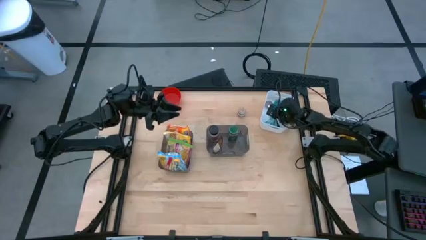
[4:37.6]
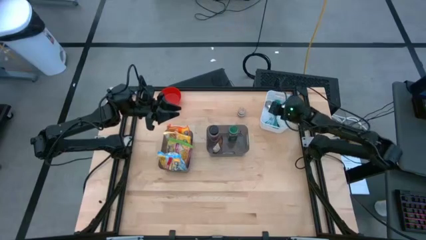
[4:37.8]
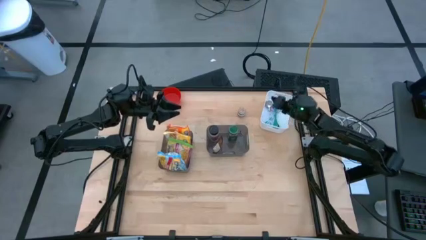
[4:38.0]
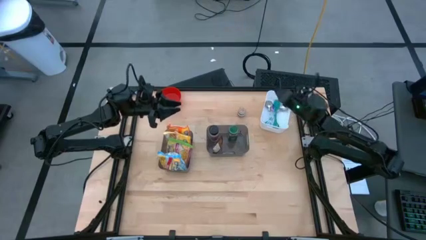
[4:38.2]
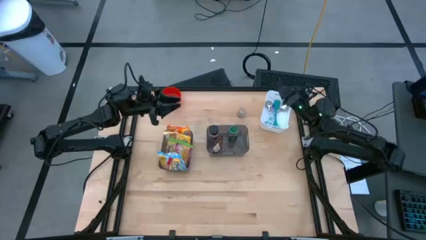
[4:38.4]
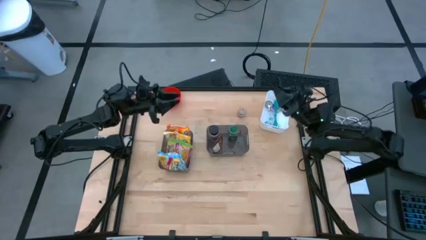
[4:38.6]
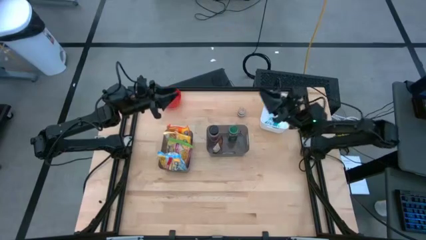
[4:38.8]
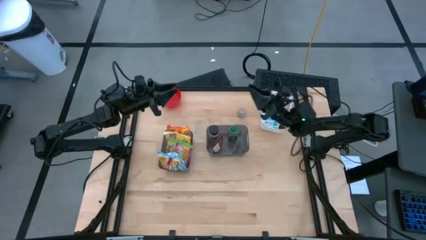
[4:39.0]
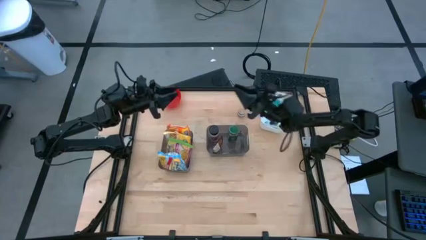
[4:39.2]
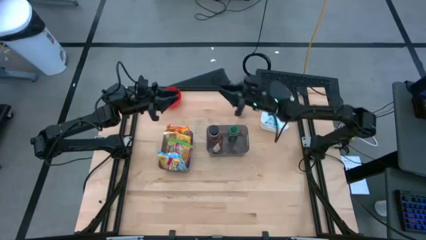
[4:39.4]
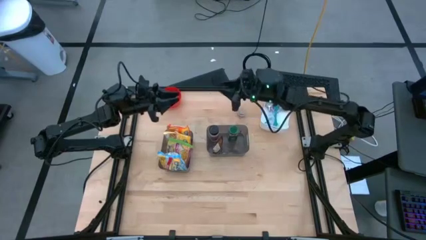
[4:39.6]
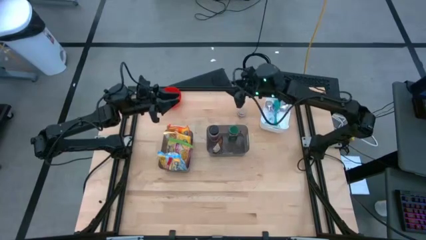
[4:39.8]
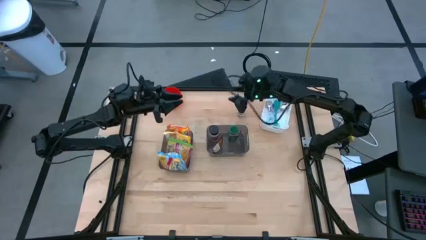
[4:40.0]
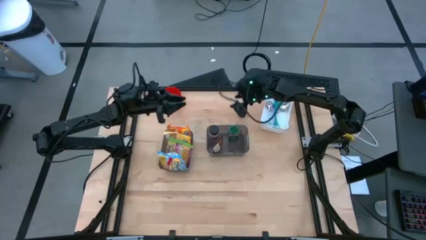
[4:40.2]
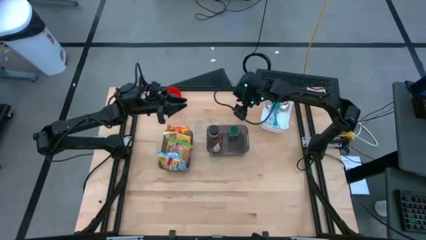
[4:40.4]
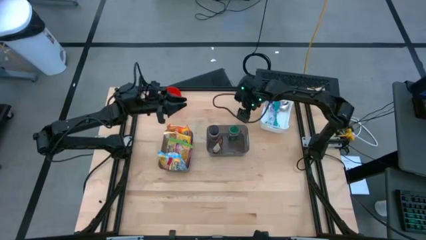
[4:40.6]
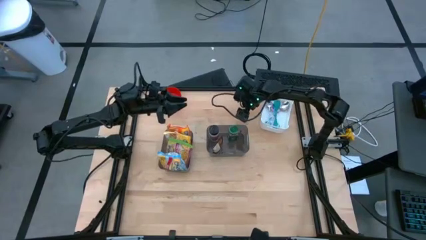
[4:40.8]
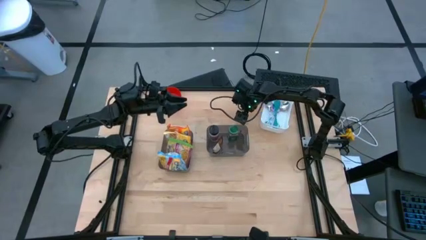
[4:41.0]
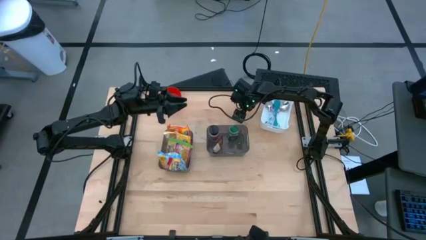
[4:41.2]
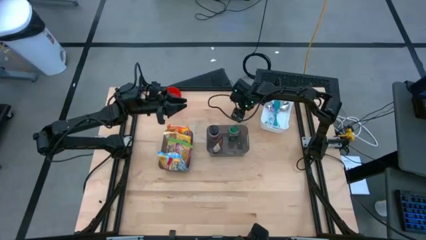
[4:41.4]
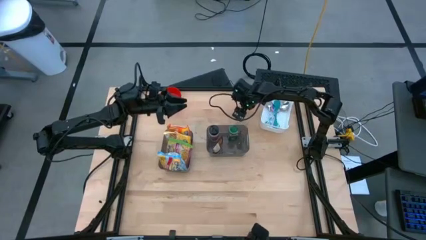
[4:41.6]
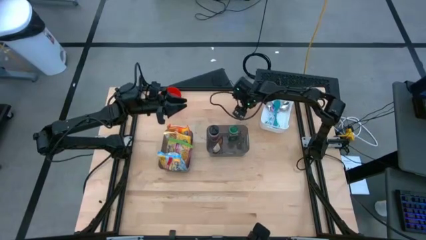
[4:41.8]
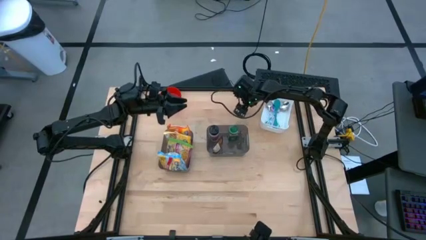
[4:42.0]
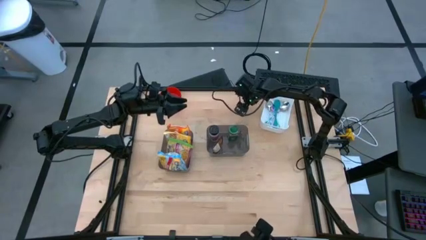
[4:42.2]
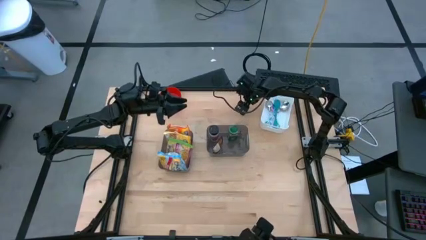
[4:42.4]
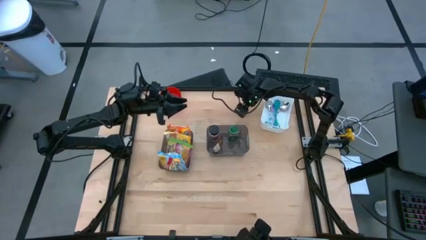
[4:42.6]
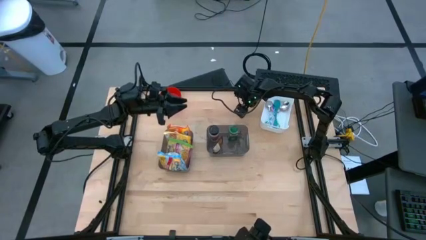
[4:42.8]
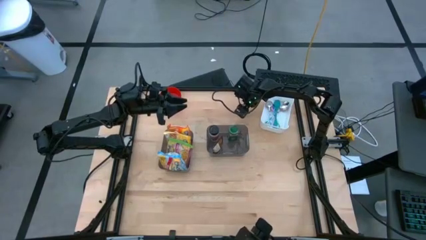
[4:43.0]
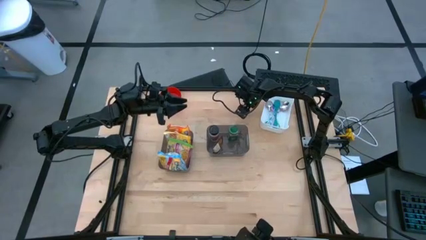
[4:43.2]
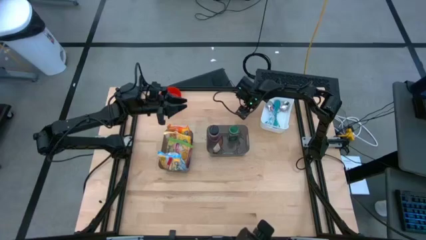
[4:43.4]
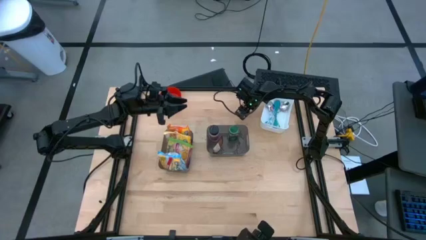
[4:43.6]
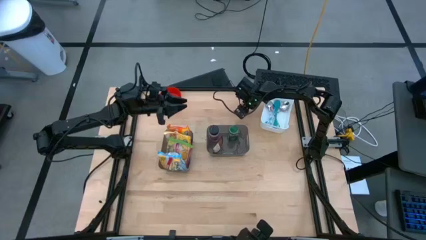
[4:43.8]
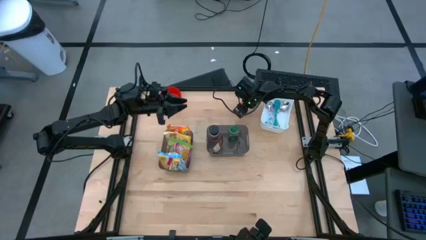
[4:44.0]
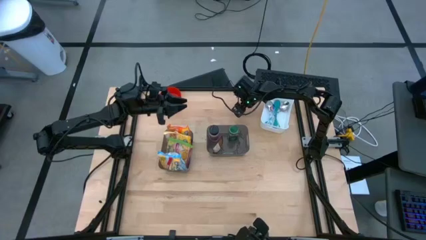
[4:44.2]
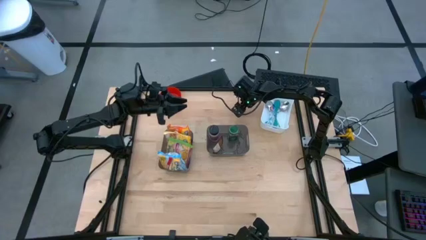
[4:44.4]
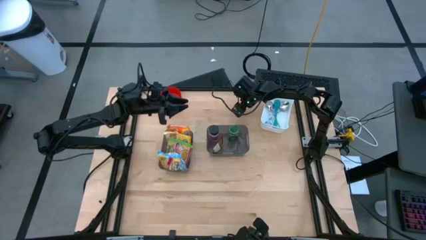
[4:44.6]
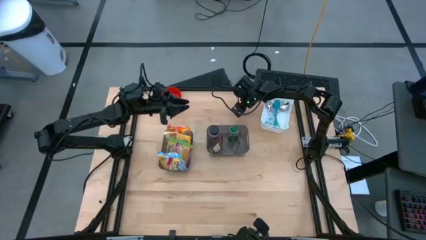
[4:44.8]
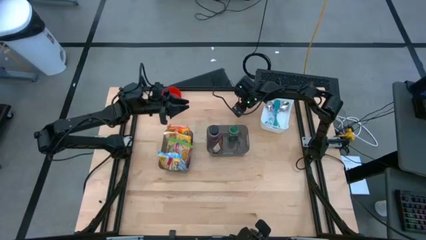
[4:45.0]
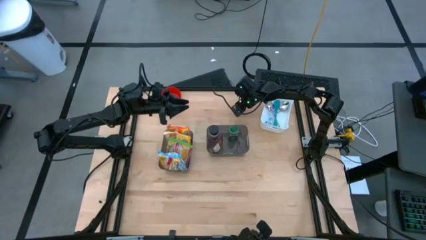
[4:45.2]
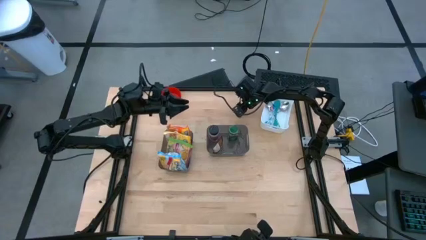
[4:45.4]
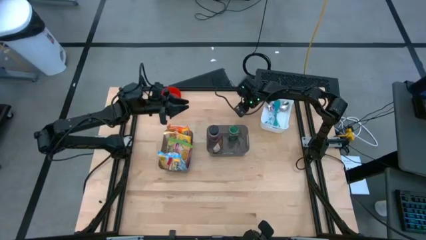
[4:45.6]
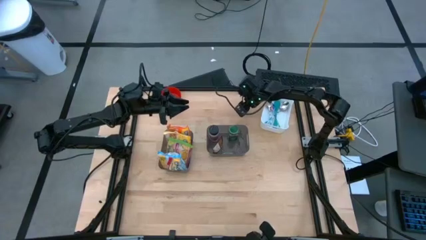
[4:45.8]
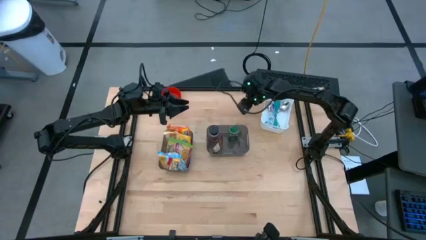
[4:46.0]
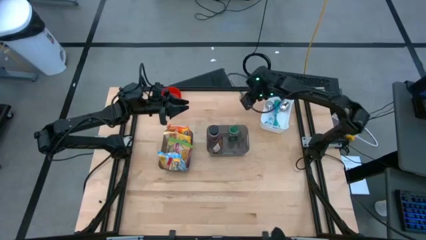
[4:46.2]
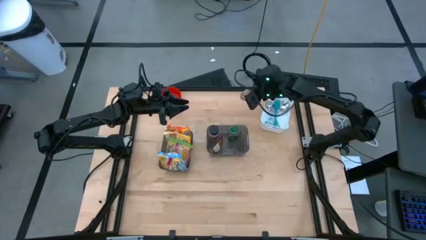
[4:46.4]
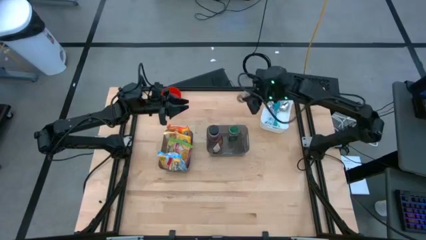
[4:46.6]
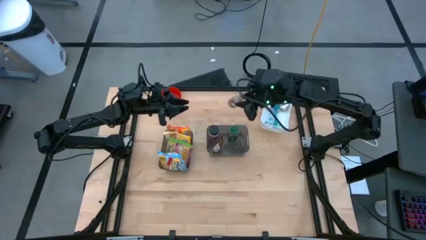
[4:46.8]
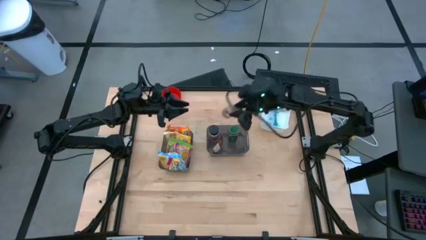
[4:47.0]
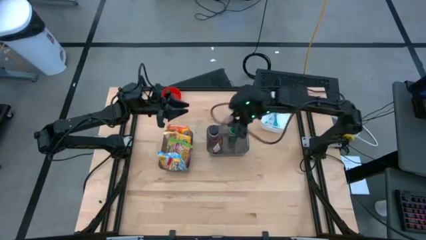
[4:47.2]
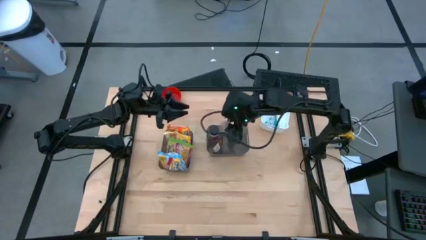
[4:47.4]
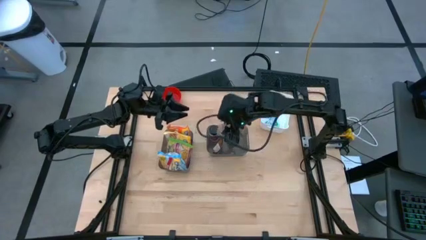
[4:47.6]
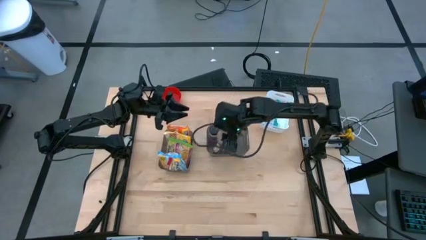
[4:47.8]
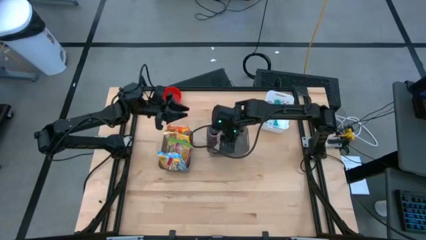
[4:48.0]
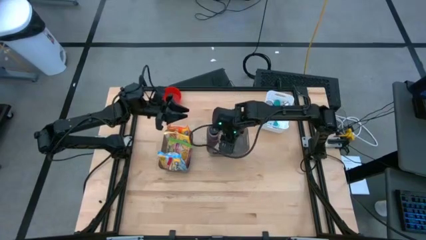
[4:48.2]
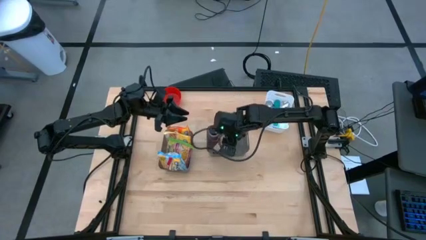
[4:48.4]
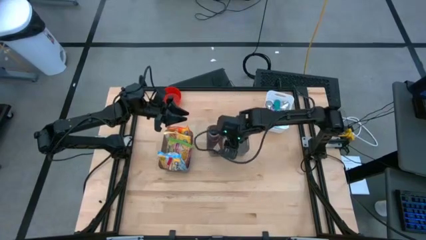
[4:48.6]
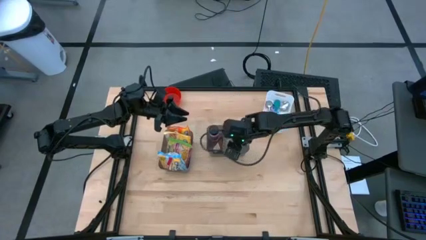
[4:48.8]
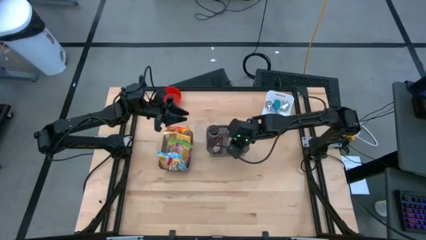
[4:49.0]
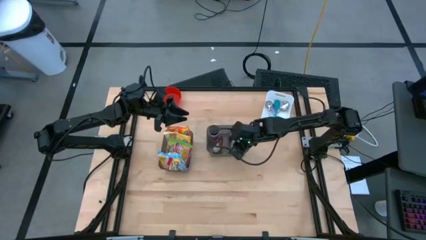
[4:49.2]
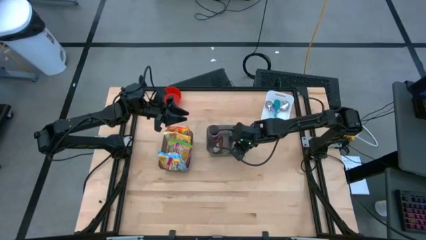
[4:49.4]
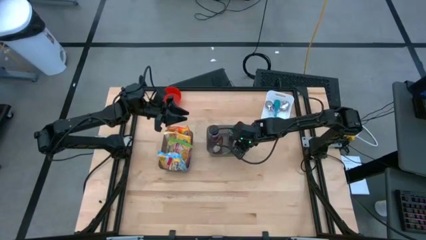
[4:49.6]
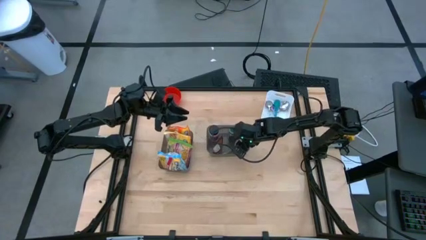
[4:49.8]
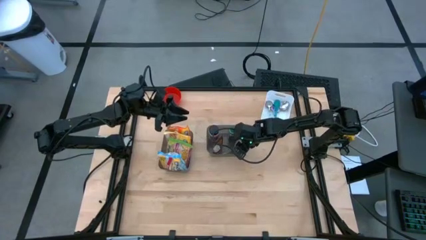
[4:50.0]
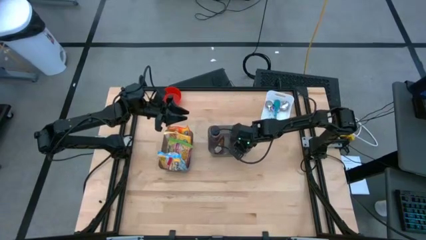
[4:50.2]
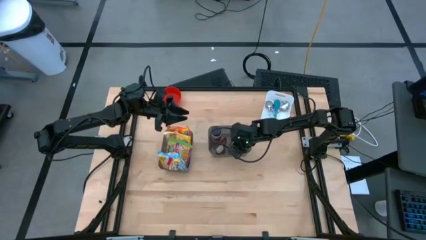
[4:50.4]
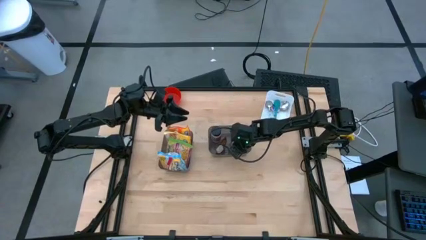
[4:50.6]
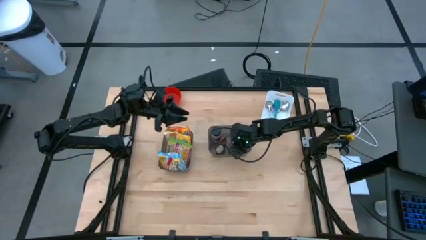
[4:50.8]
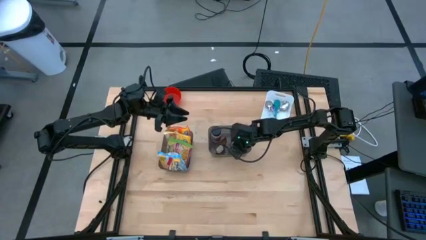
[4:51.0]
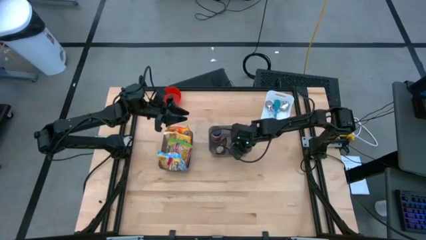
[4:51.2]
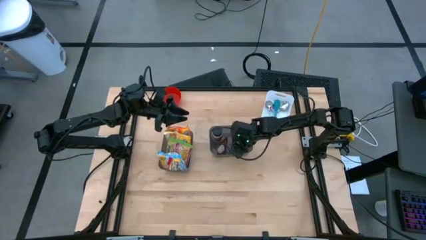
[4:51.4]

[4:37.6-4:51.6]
Task: Pick & Place Food Item
Put the brown spice bottle into the right black bin
